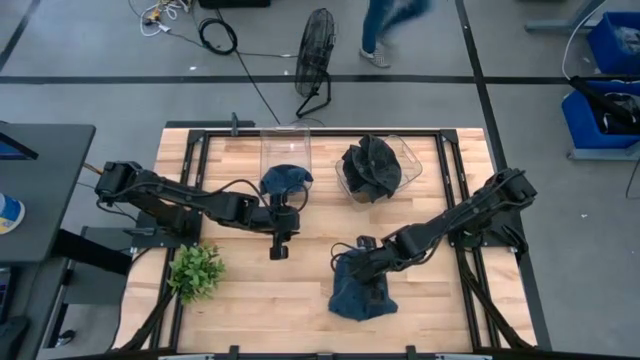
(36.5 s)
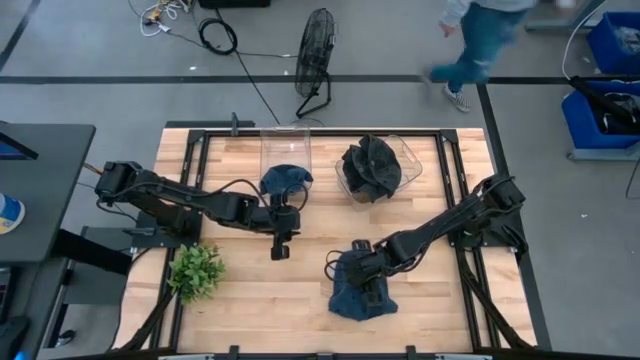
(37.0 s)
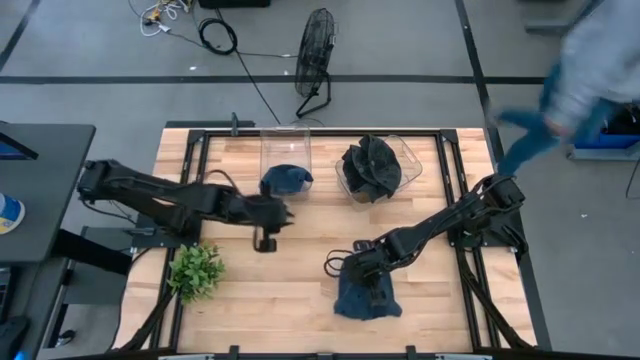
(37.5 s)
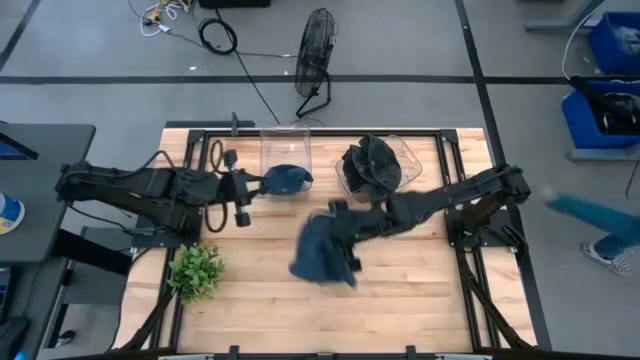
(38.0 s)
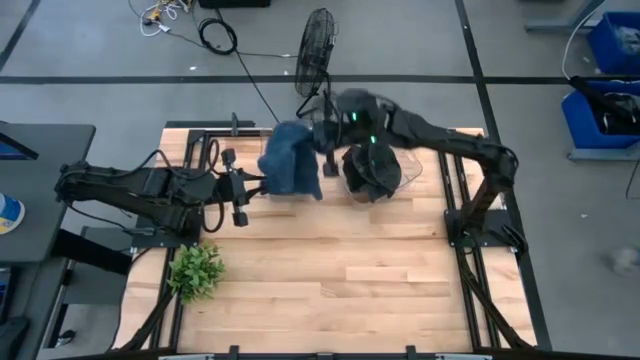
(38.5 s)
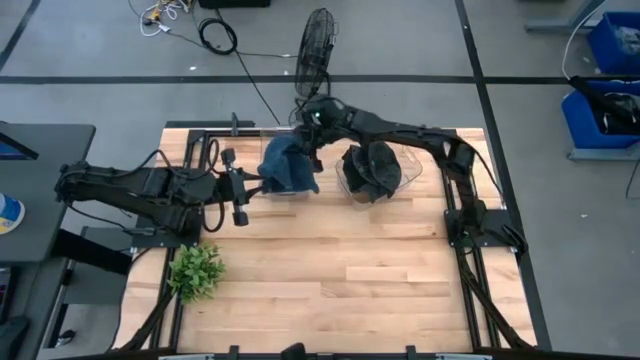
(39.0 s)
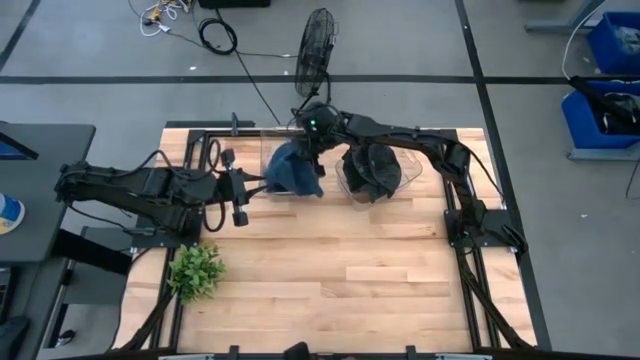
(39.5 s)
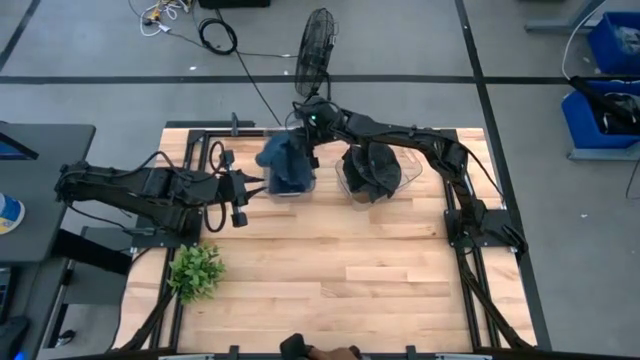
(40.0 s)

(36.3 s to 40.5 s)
Task: Pick & Place hat
Put the blue cap into the left transparent bin

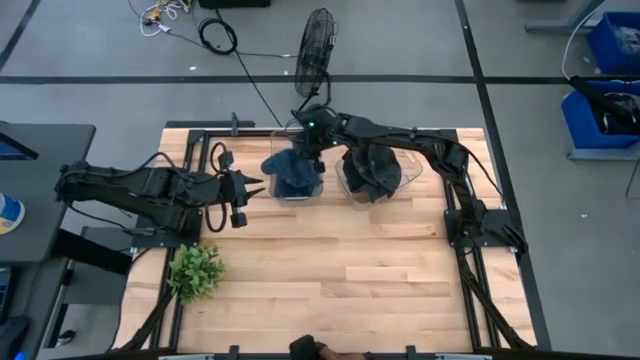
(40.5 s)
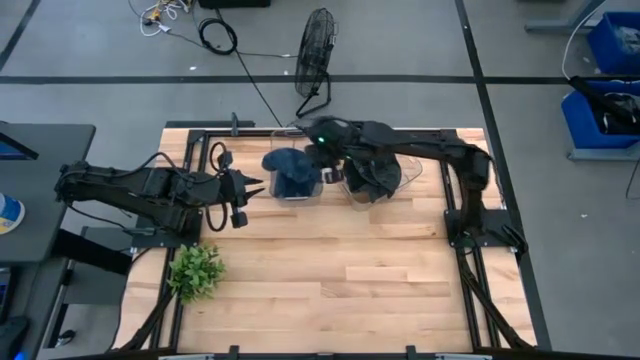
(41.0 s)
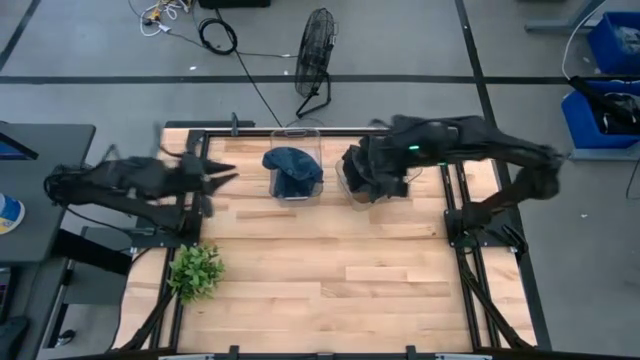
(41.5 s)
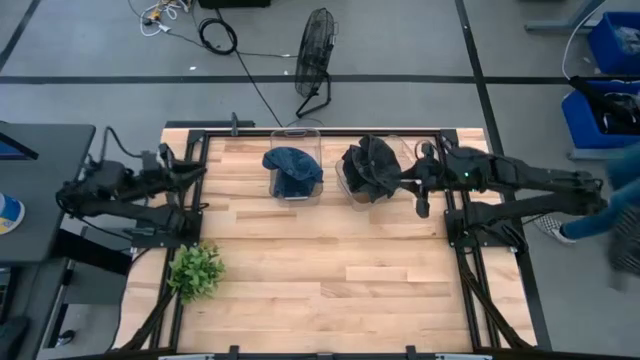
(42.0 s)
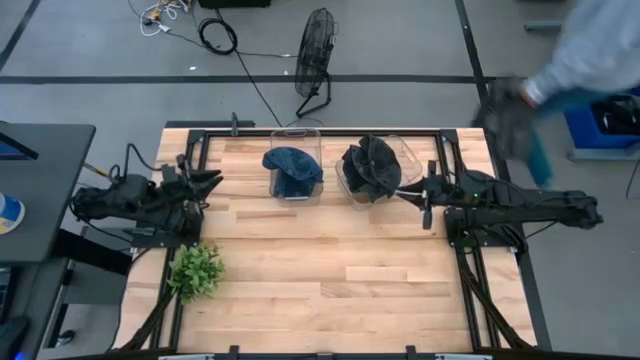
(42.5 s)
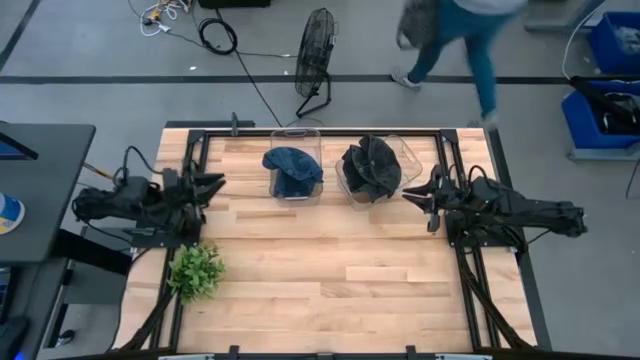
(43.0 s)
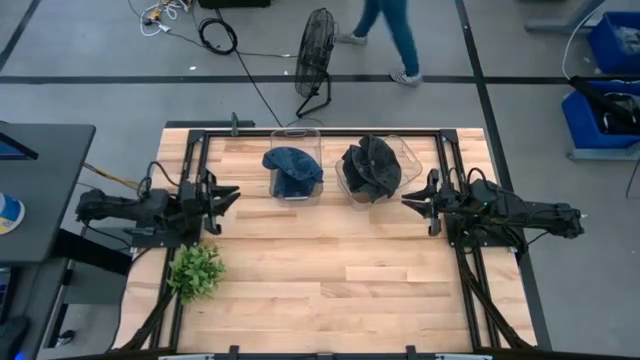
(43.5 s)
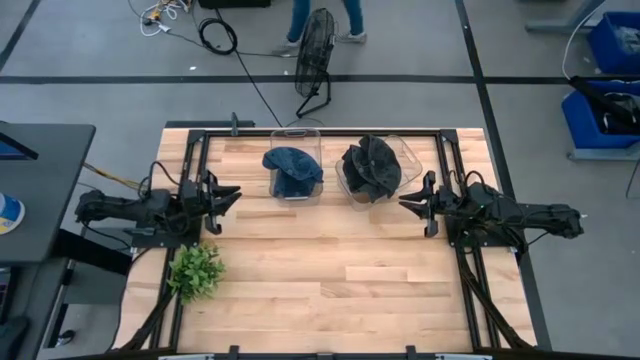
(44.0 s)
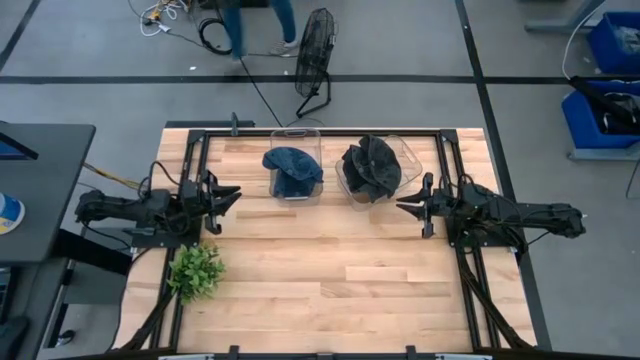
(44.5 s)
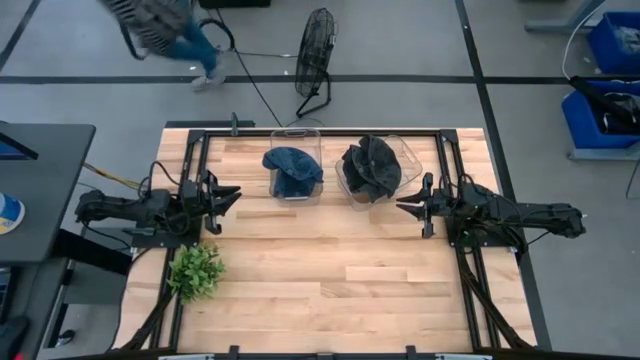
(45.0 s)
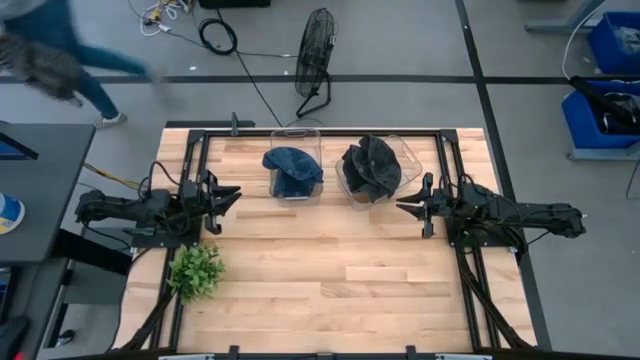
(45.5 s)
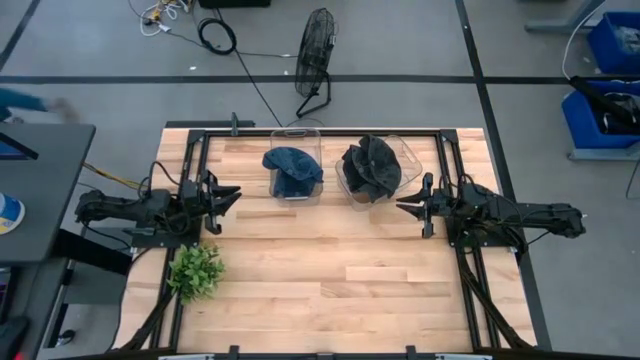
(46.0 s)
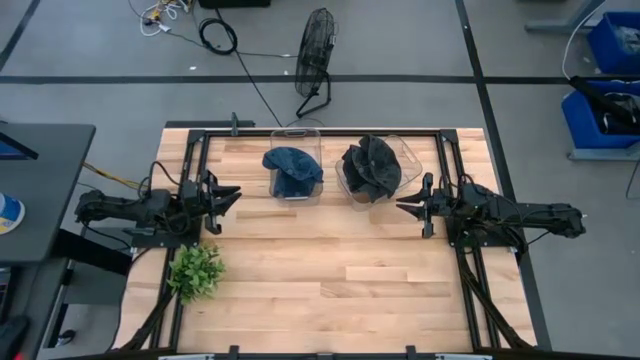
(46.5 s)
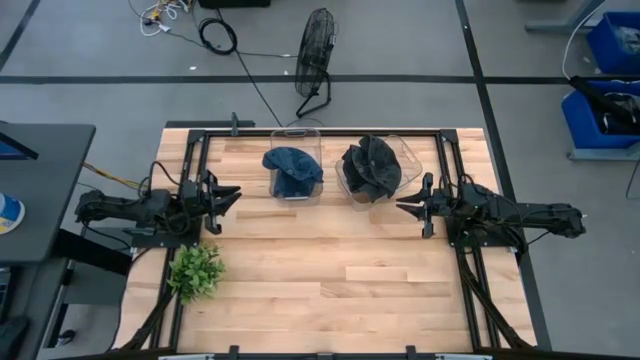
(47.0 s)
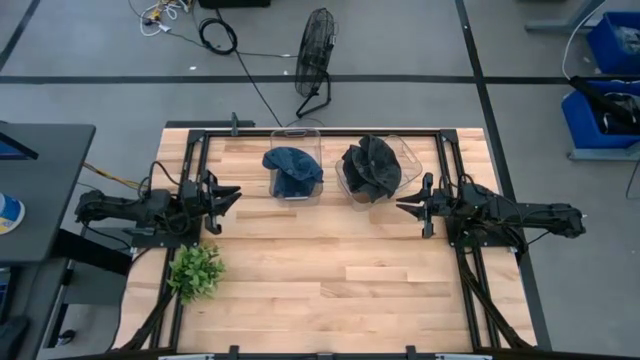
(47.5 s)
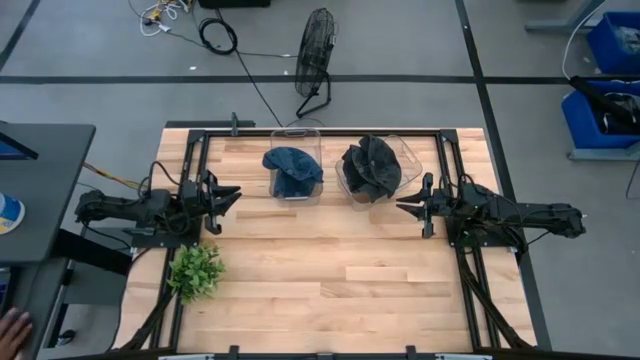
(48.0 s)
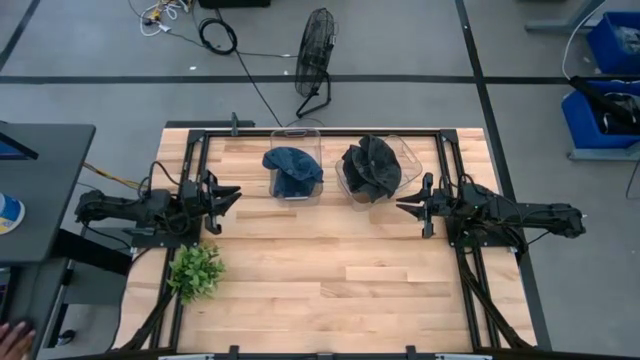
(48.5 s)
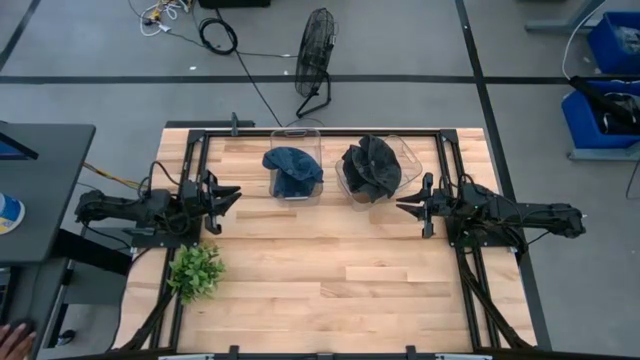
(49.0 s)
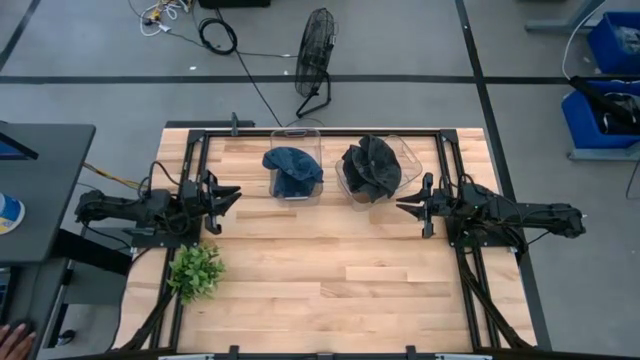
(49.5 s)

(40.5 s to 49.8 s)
Return to Home Position

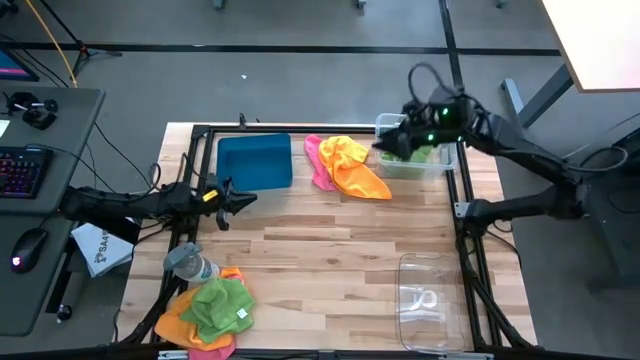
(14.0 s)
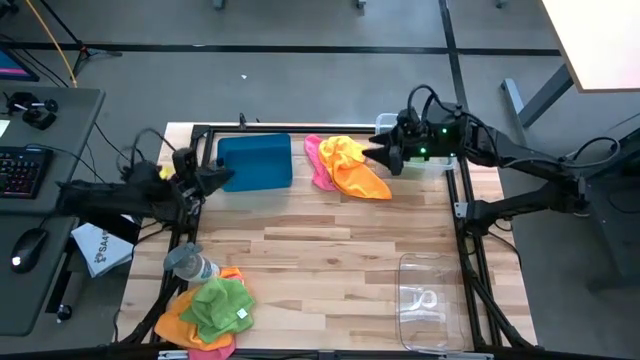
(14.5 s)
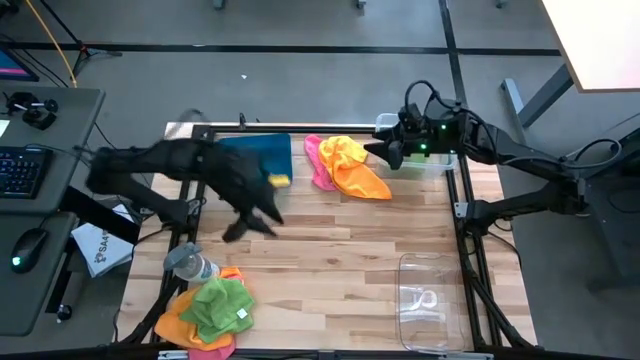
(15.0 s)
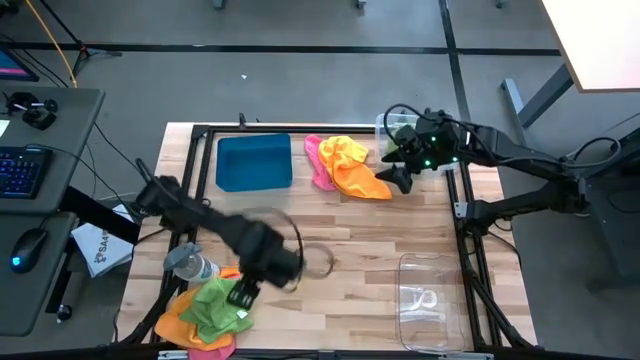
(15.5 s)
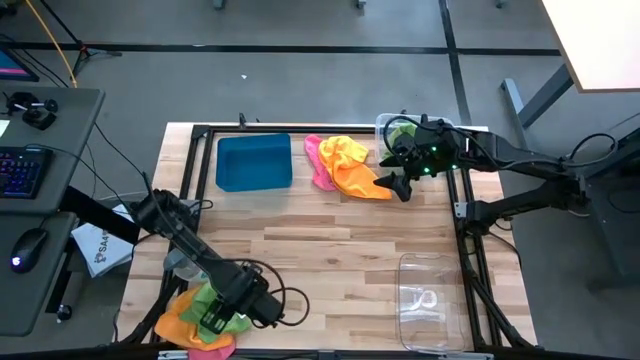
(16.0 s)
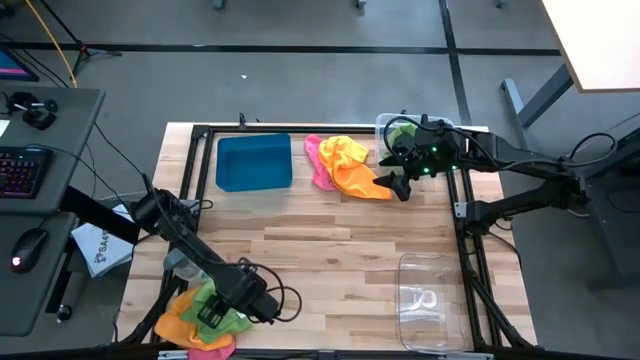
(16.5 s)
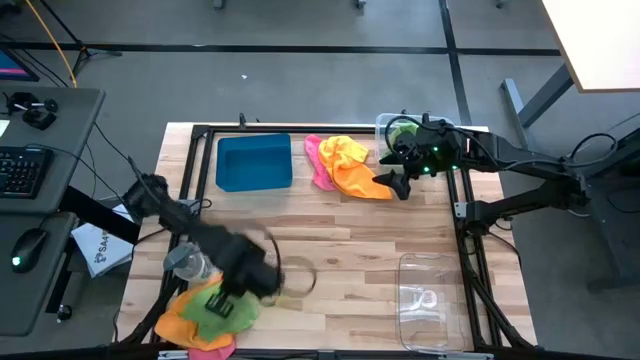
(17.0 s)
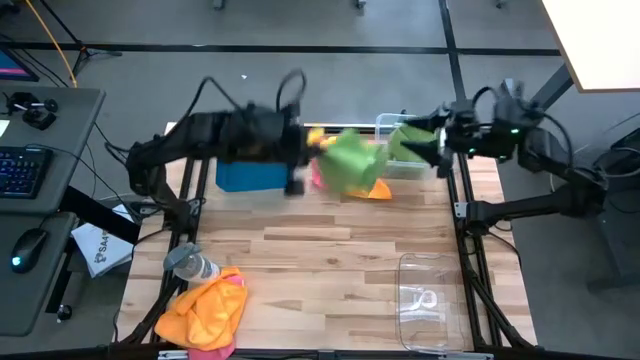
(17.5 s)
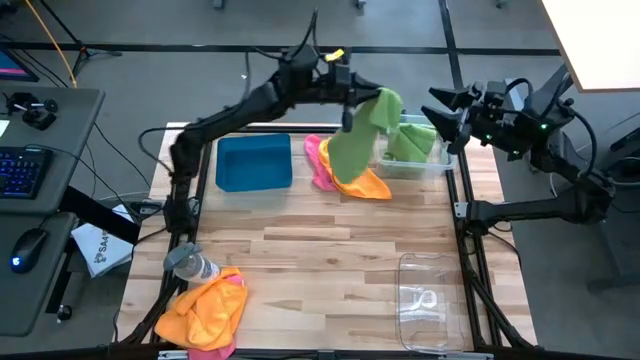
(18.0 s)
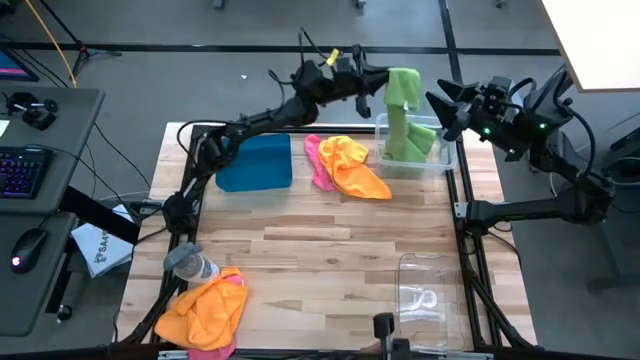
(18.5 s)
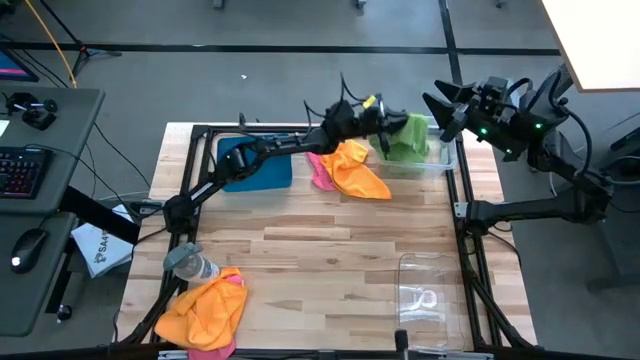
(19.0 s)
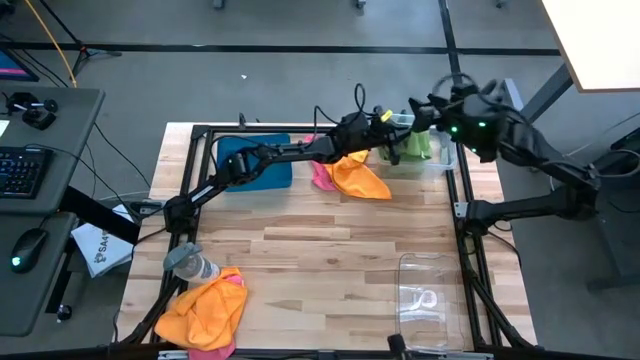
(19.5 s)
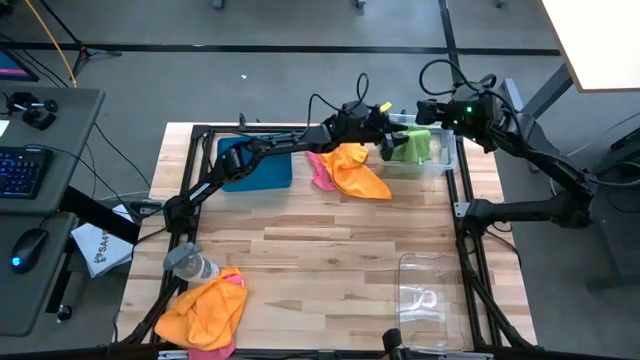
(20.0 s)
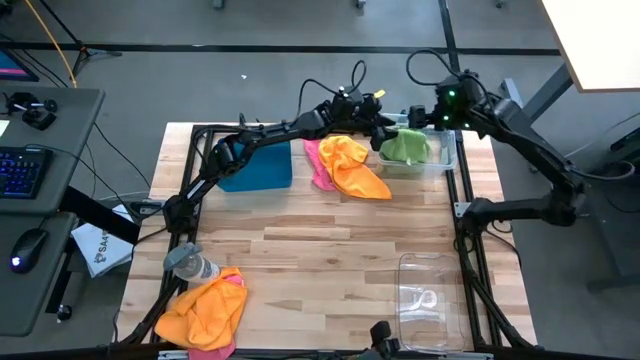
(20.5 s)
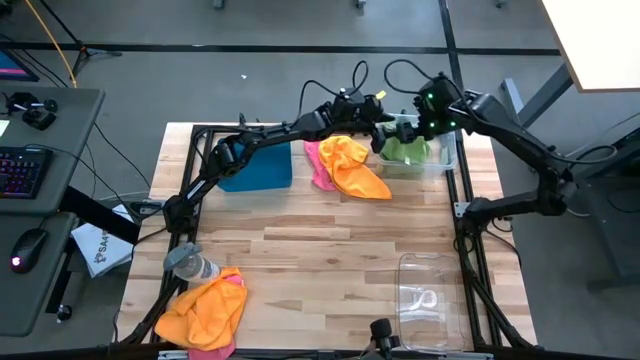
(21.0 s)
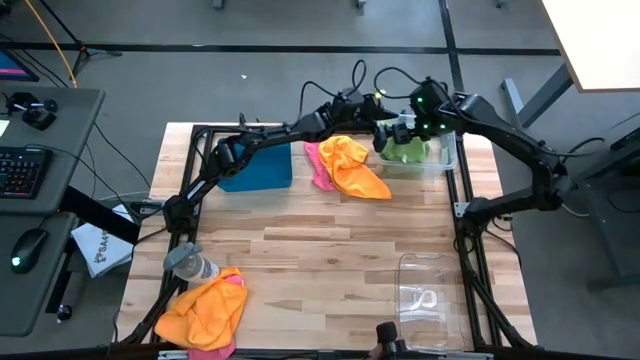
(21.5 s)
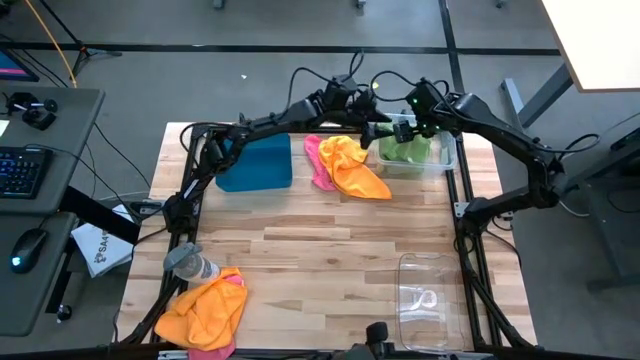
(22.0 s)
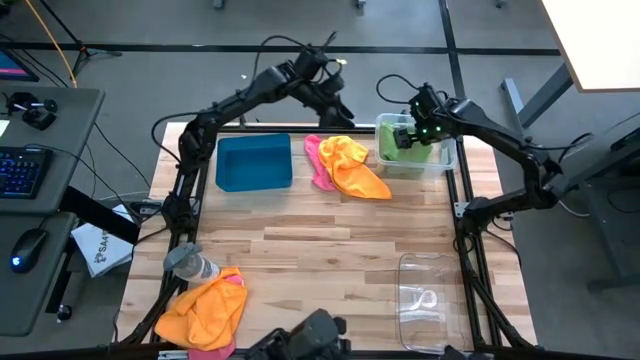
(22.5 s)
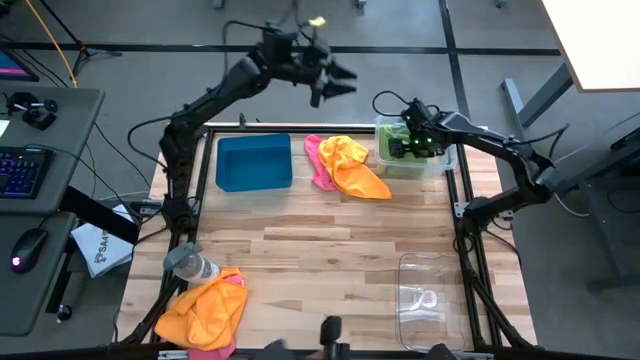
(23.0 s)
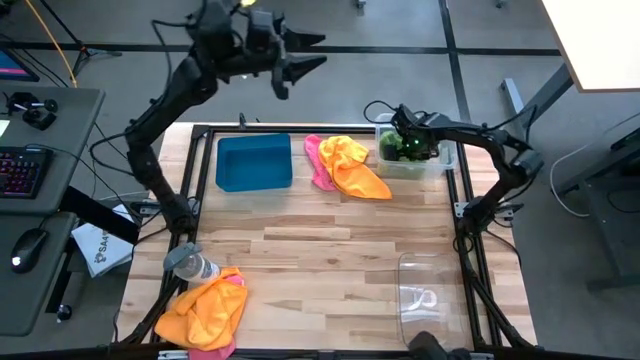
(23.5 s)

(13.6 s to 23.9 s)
Task: Sort microfiber towel by color & place in baskets
Put the green towel into the top transparent bin
